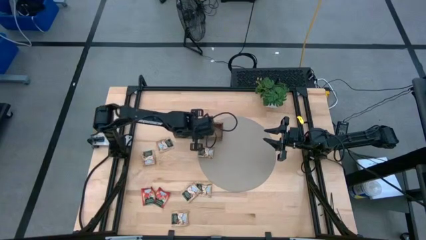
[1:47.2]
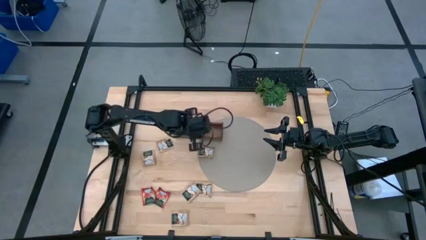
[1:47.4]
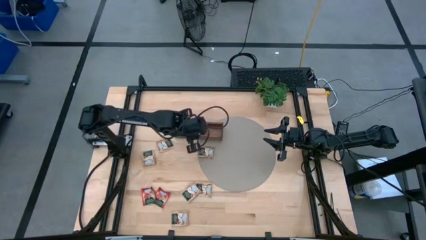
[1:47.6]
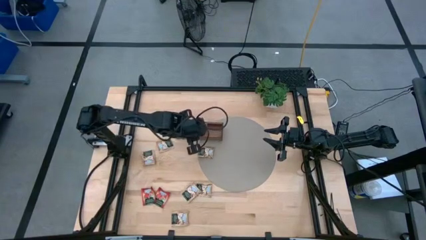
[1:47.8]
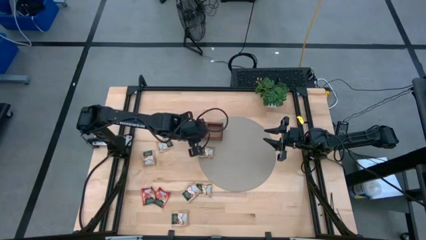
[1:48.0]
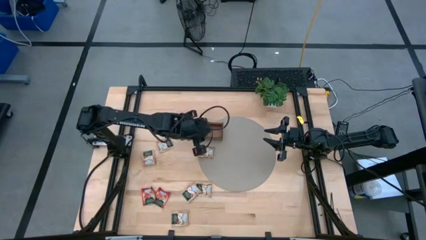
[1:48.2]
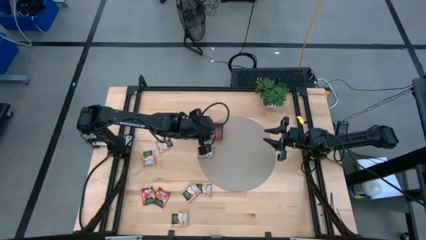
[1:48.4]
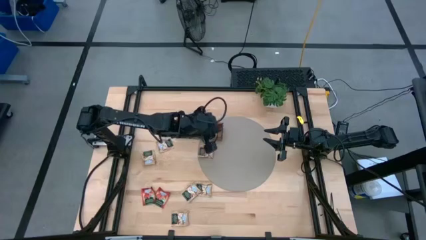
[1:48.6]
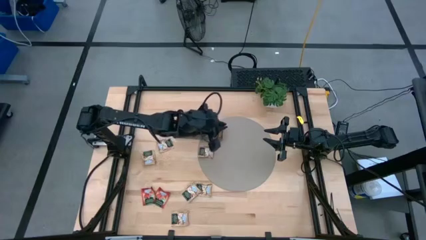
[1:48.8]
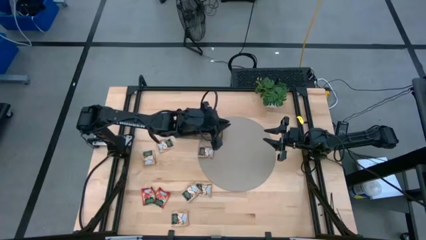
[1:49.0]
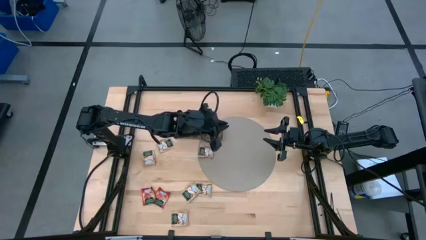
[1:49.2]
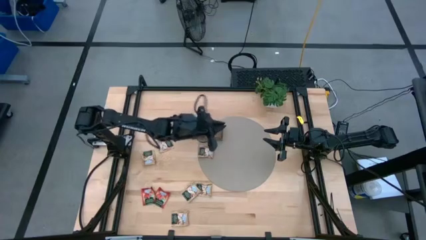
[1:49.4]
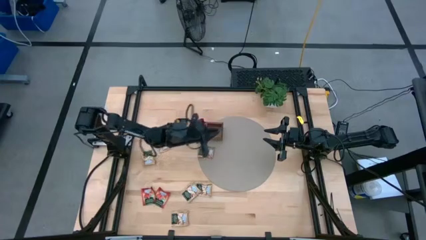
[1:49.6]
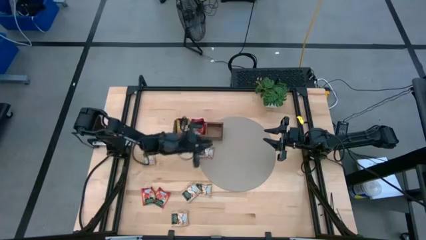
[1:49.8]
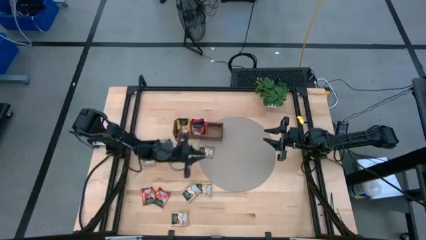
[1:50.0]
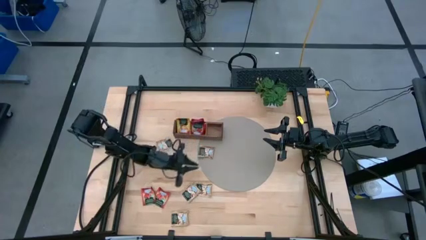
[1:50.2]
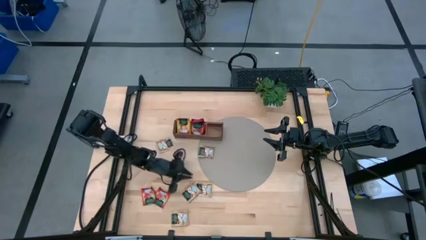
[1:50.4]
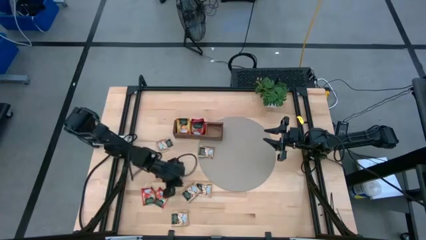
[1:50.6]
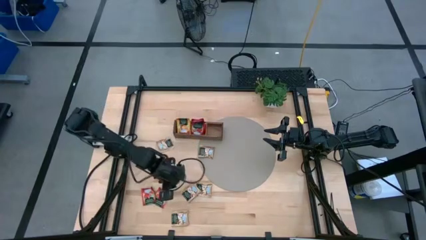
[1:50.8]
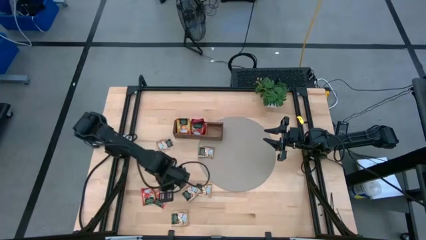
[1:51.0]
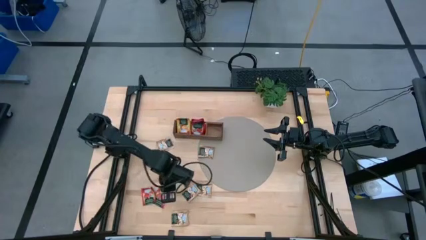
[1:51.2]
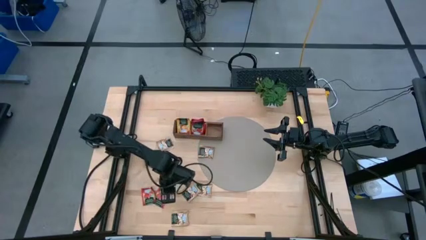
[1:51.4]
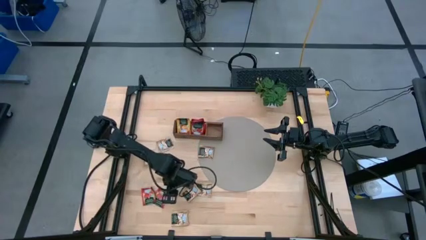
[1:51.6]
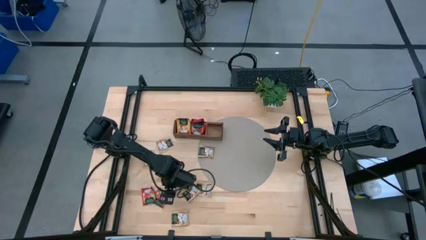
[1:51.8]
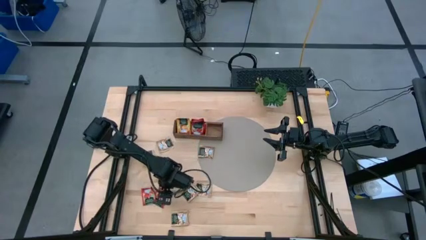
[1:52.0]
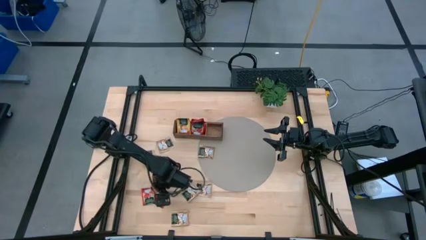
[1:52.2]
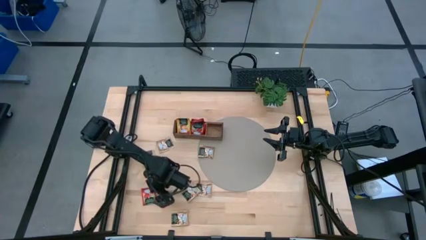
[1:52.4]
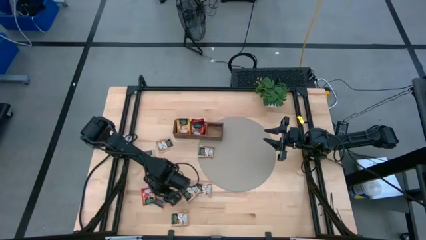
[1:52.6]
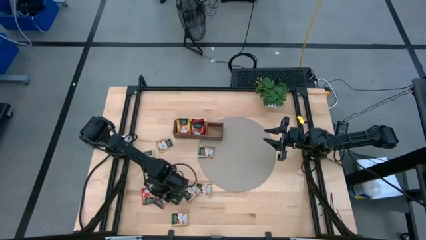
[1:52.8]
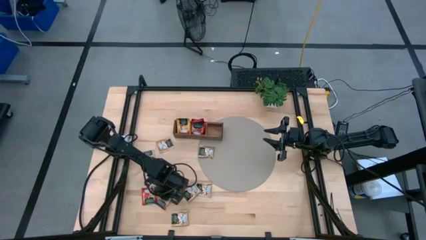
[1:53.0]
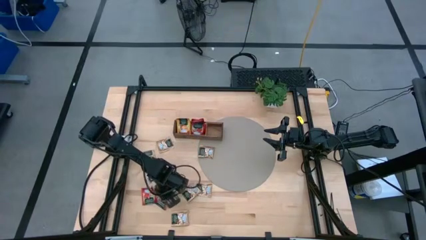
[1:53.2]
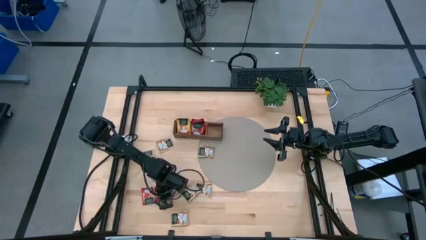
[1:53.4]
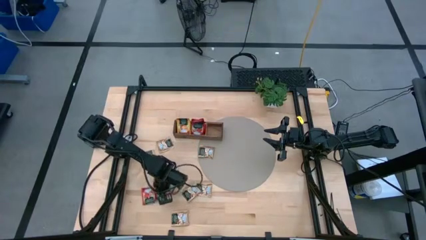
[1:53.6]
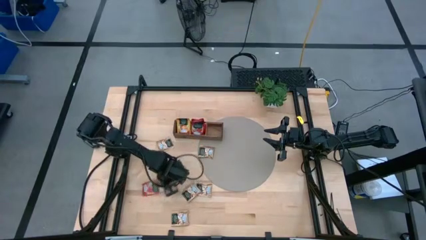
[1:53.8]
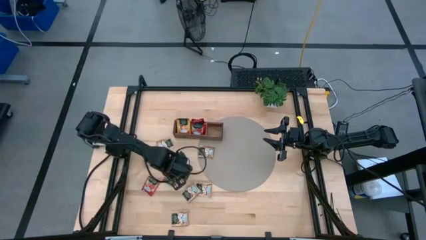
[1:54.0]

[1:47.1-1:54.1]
Task: Pick & Place Tea
Put the red tea bag into the middle section of the wooden organizer

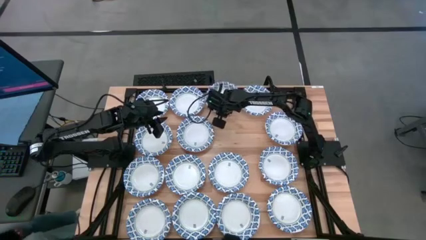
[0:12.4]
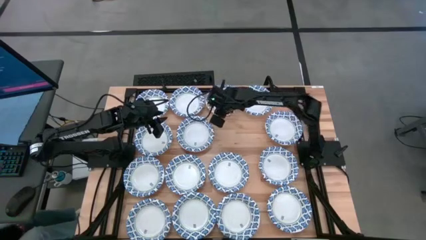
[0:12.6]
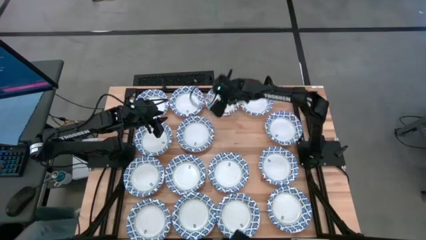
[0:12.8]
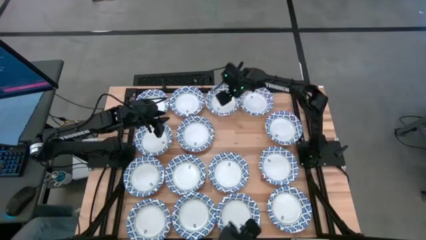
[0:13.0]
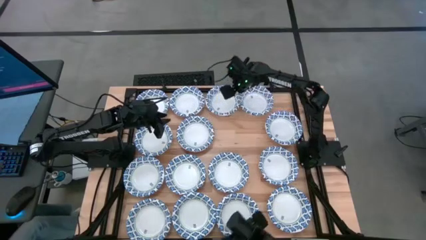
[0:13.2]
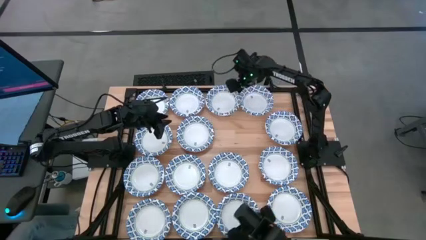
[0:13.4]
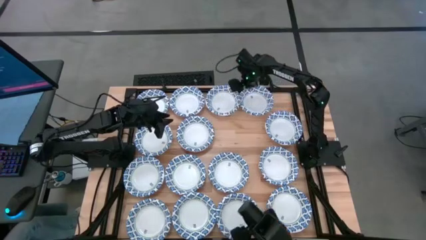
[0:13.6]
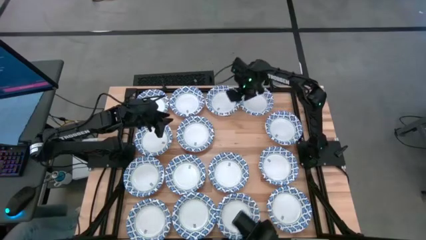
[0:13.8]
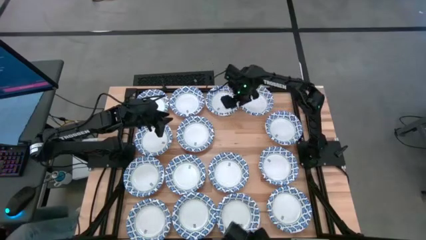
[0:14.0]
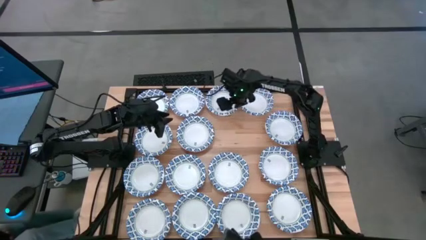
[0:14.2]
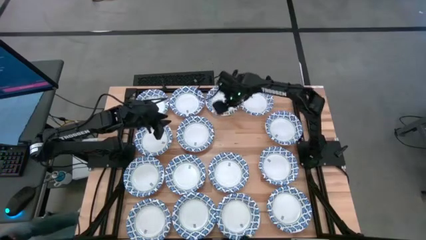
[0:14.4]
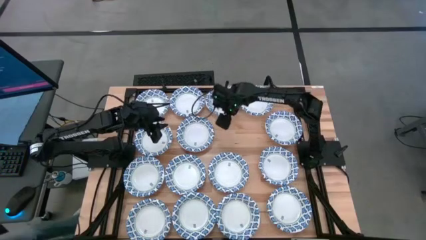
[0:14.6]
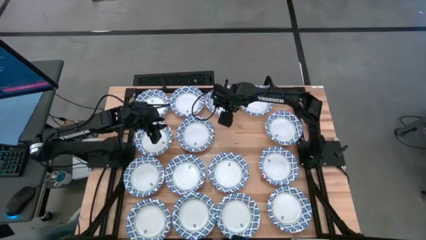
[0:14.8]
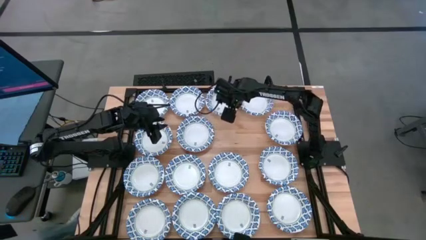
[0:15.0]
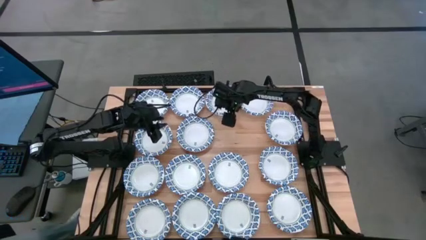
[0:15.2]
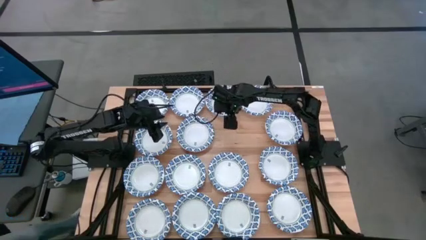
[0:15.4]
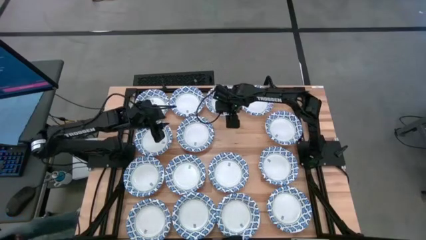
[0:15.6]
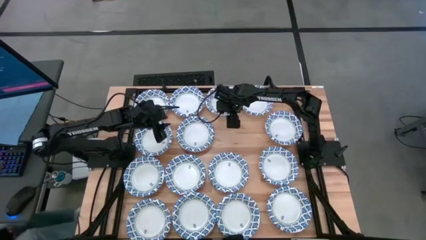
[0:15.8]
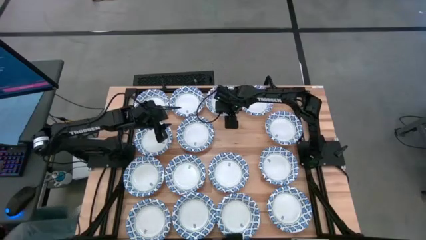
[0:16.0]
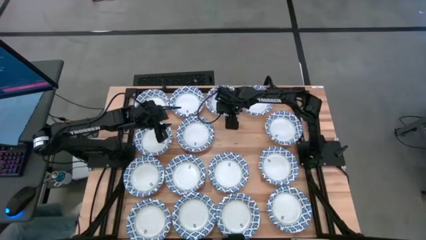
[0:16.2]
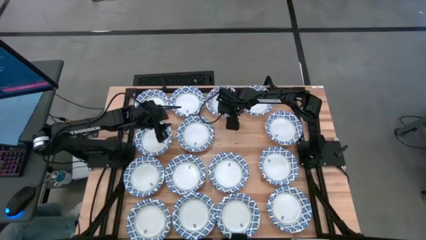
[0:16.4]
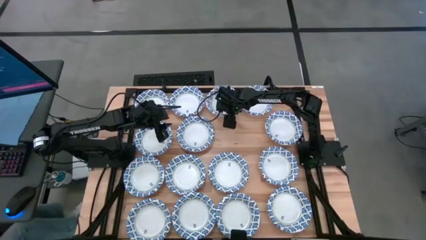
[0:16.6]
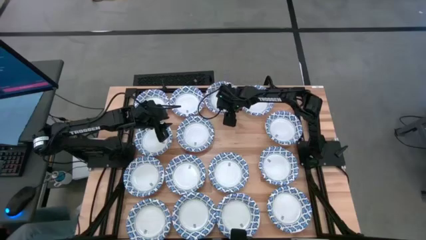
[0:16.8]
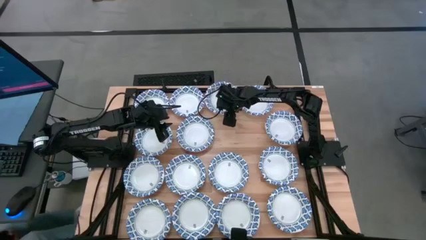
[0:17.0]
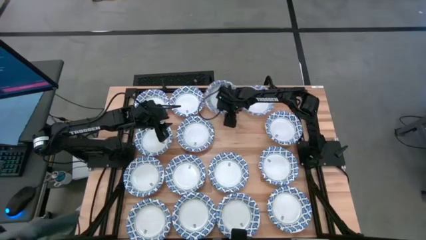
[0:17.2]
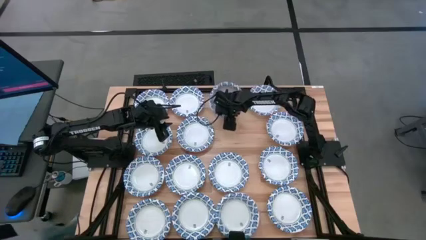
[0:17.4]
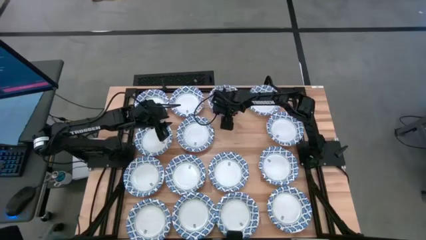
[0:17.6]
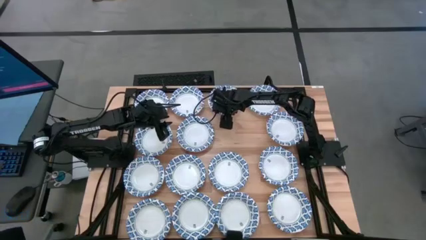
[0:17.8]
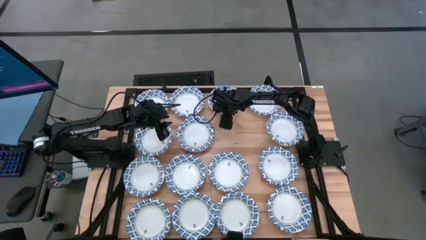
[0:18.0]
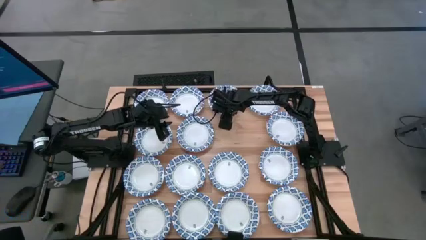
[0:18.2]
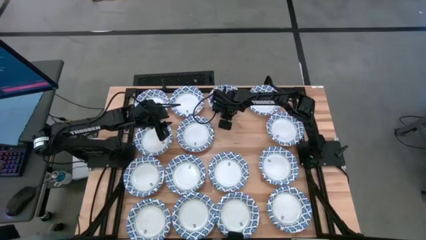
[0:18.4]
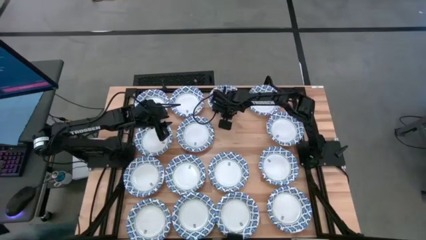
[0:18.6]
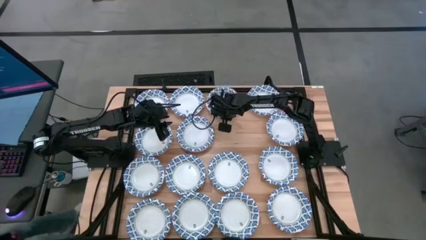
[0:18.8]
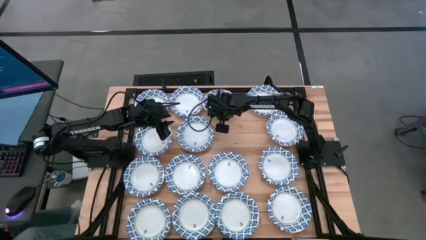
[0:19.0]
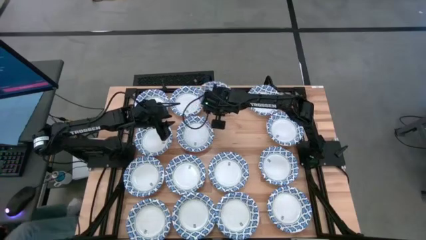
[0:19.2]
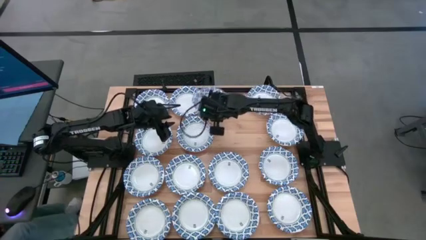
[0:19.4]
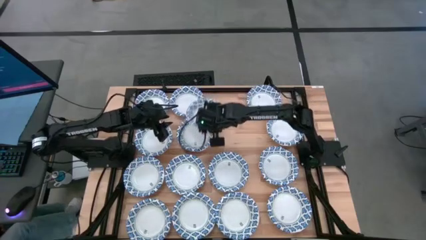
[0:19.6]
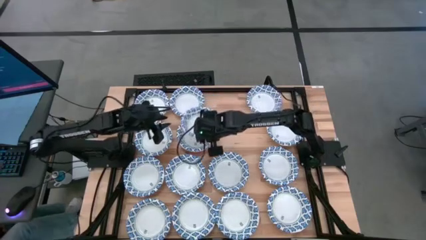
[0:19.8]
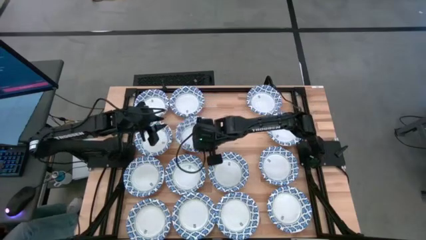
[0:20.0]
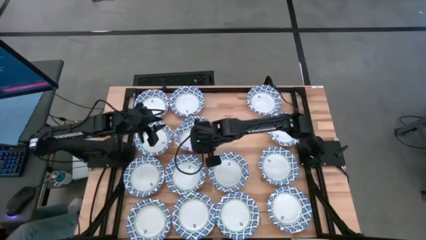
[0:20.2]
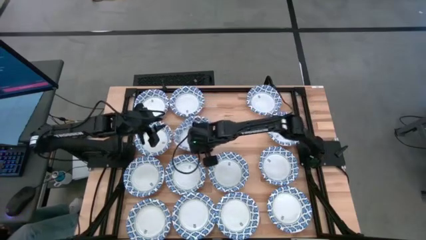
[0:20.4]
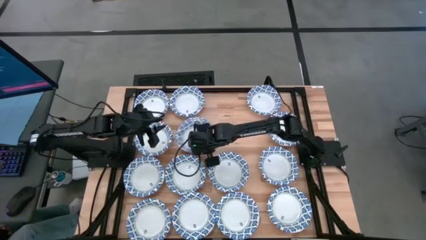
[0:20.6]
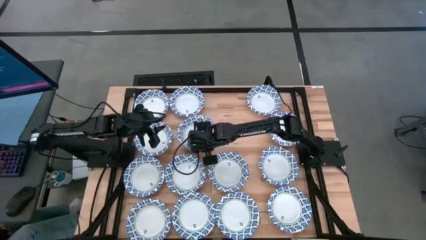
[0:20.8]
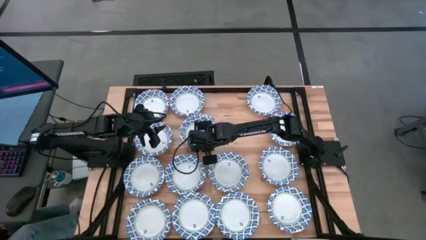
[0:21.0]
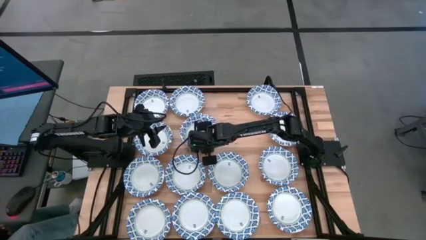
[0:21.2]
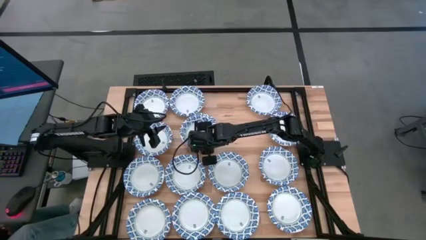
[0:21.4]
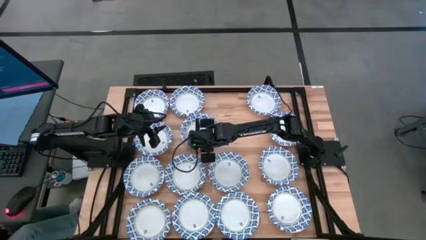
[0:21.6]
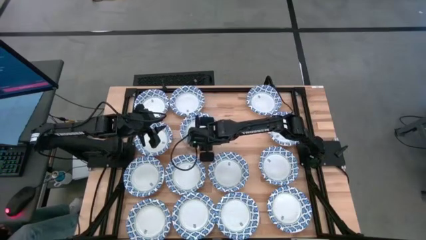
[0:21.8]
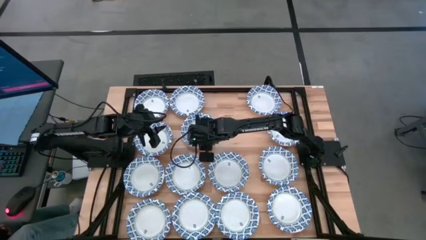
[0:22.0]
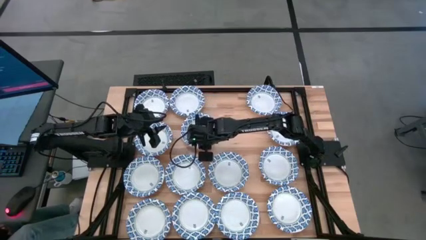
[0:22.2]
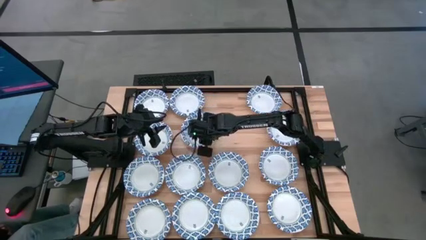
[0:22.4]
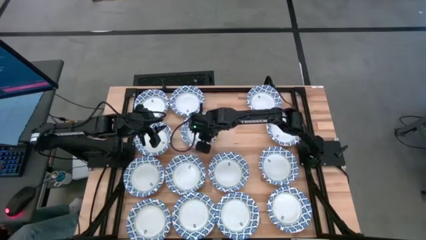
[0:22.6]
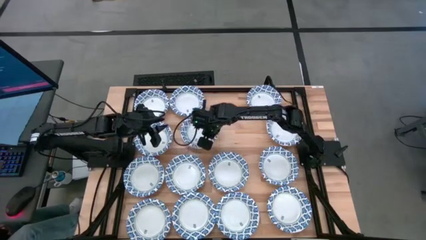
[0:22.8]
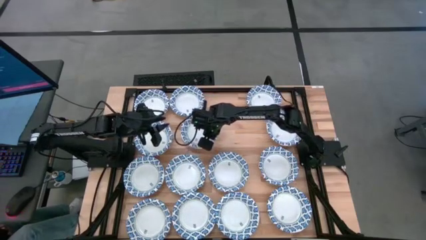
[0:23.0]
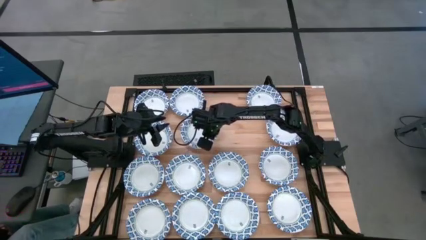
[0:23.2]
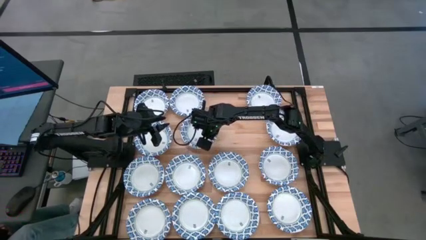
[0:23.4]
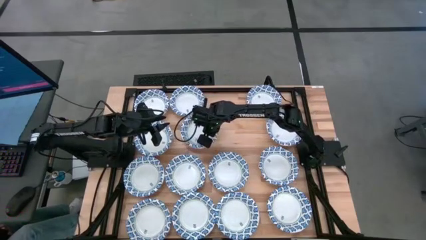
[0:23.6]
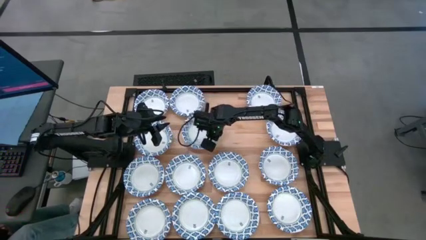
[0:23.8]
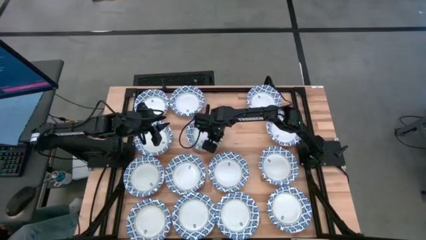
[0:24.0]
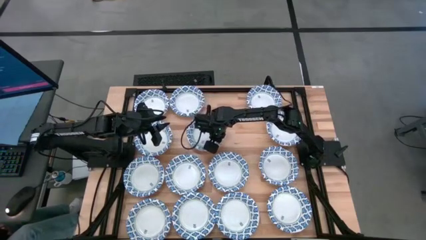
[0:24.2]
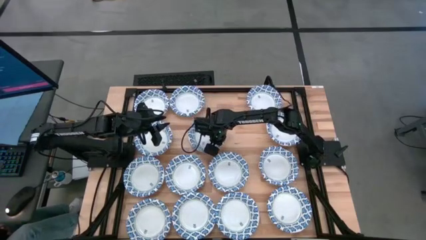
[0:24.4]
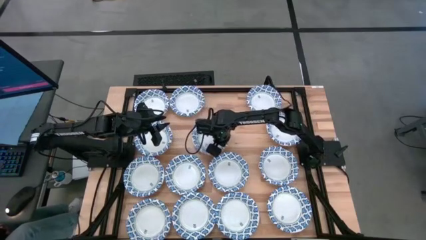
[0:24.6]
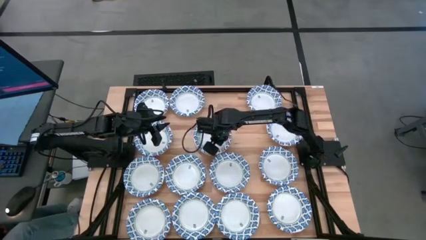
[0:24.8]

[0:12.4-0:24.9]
Task: Nest bowls inside each other
Stack the blue bowl on top of the blue bowls
